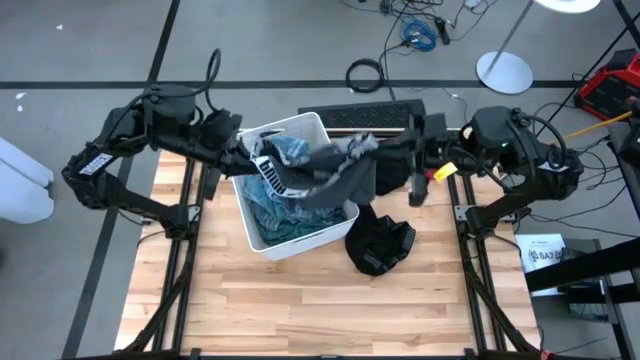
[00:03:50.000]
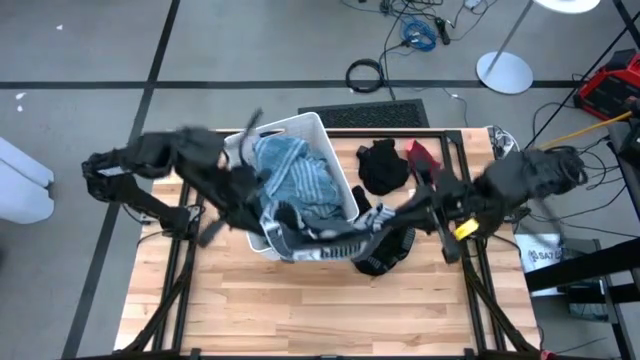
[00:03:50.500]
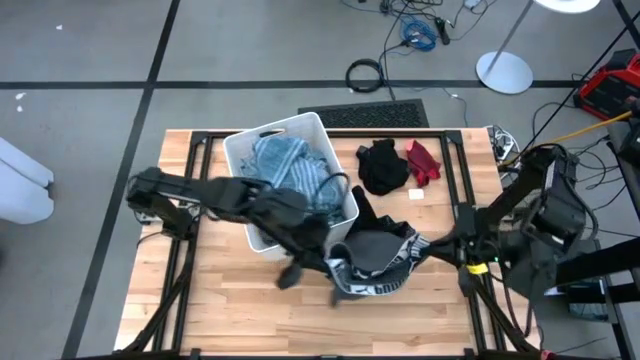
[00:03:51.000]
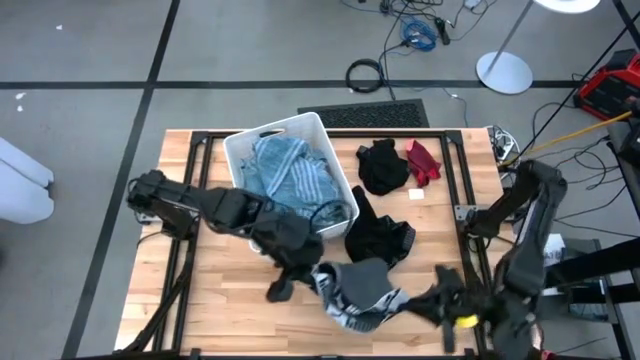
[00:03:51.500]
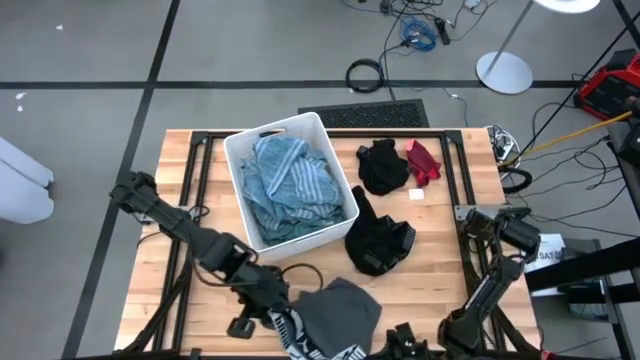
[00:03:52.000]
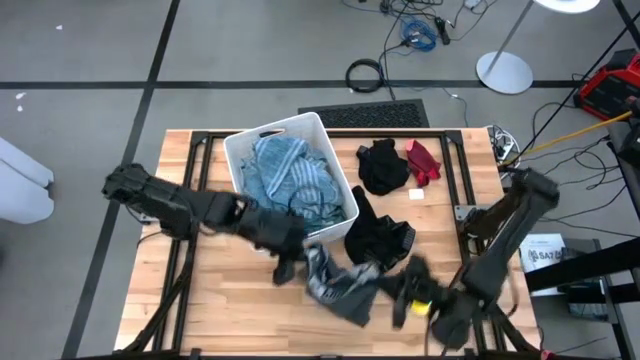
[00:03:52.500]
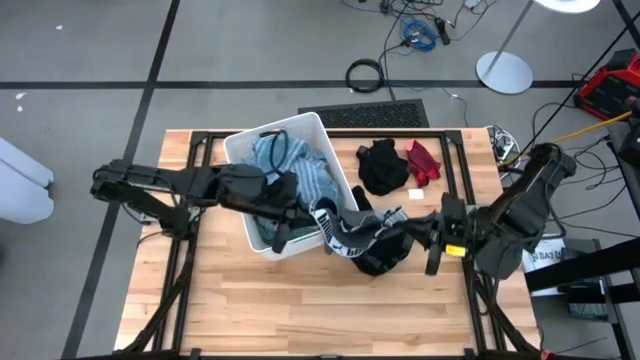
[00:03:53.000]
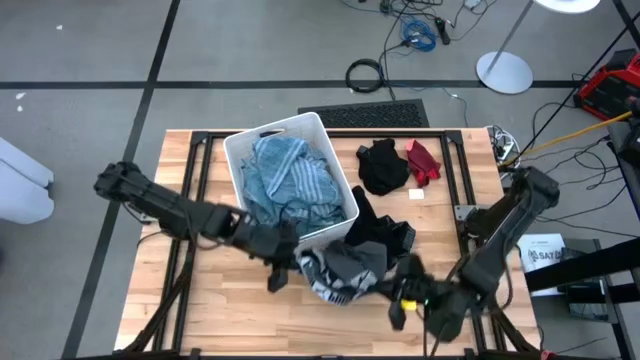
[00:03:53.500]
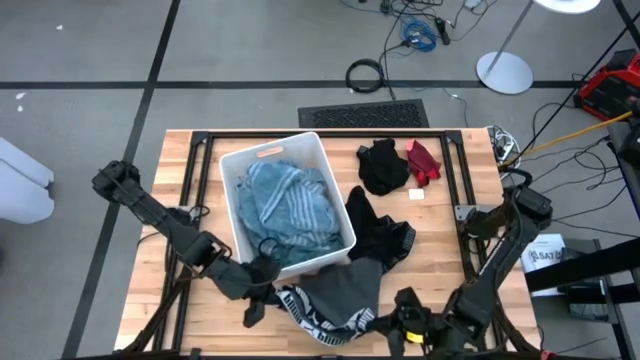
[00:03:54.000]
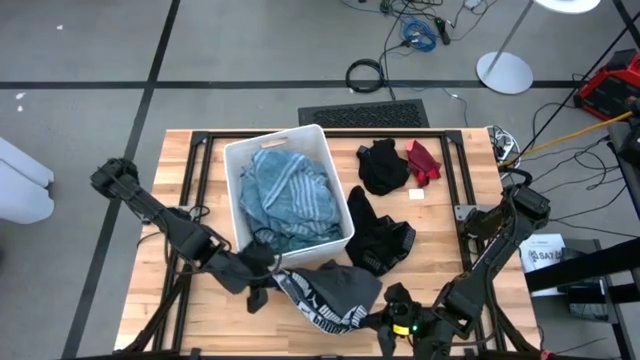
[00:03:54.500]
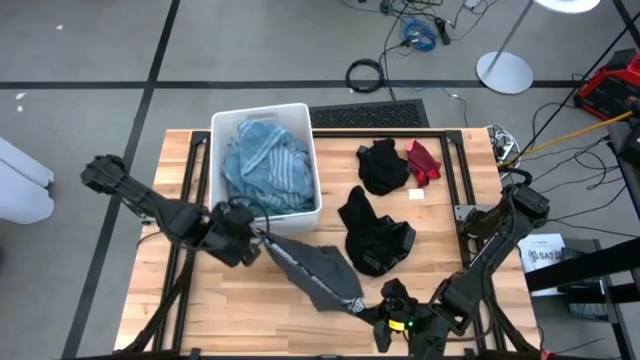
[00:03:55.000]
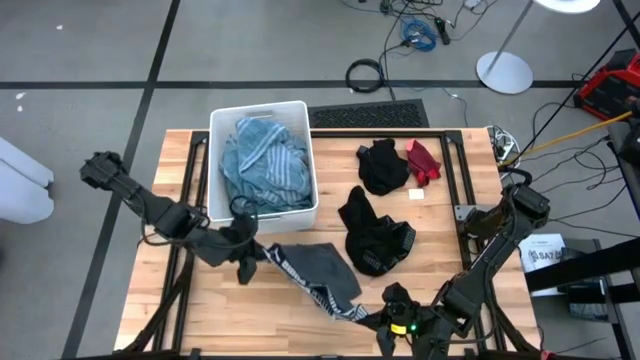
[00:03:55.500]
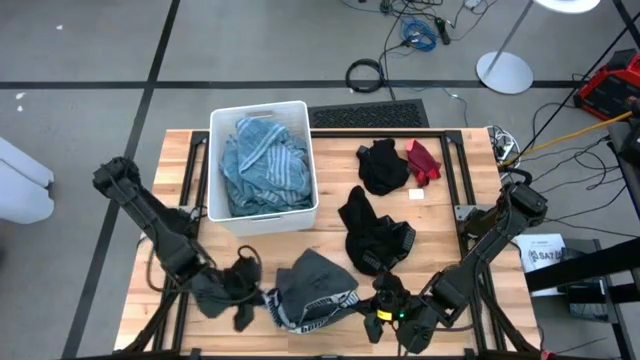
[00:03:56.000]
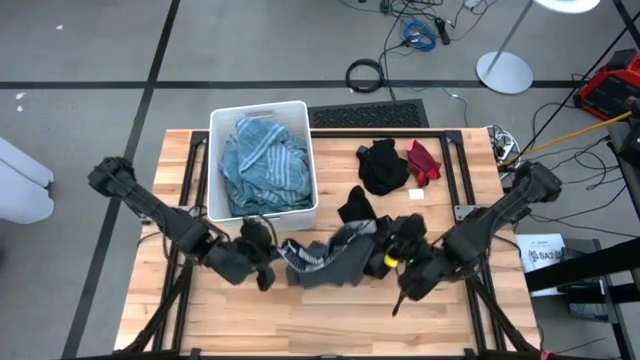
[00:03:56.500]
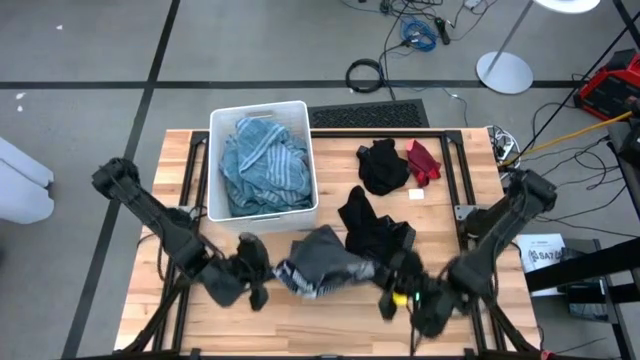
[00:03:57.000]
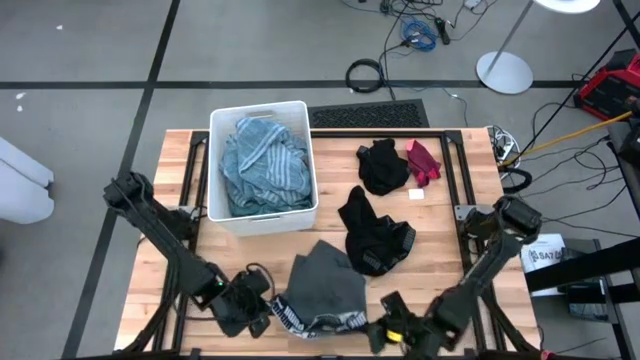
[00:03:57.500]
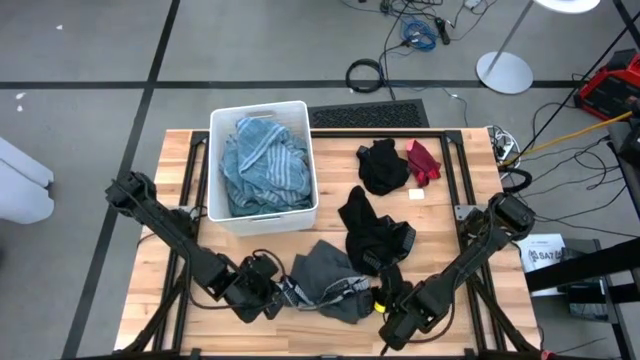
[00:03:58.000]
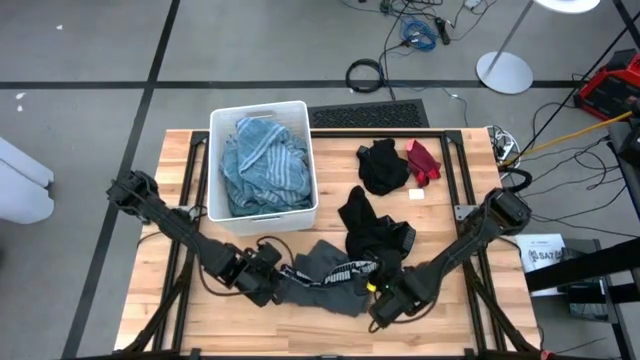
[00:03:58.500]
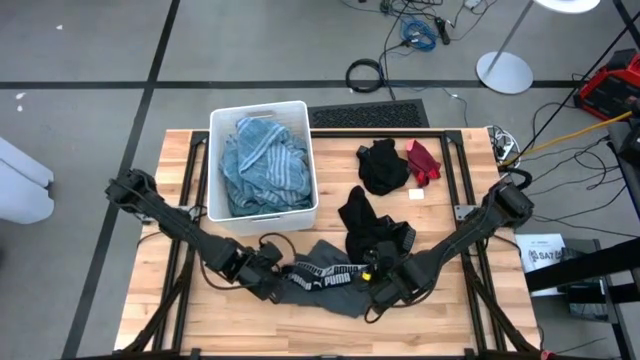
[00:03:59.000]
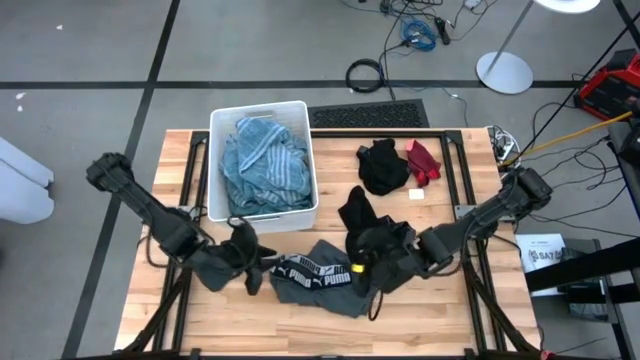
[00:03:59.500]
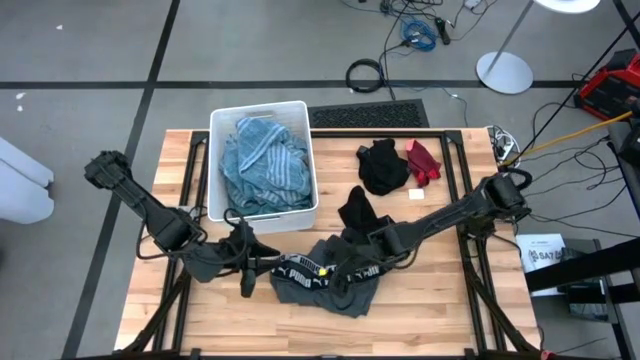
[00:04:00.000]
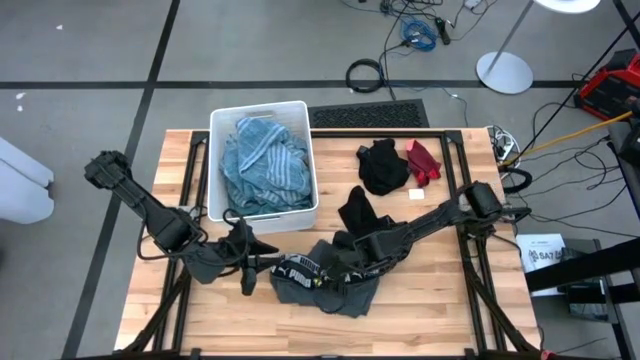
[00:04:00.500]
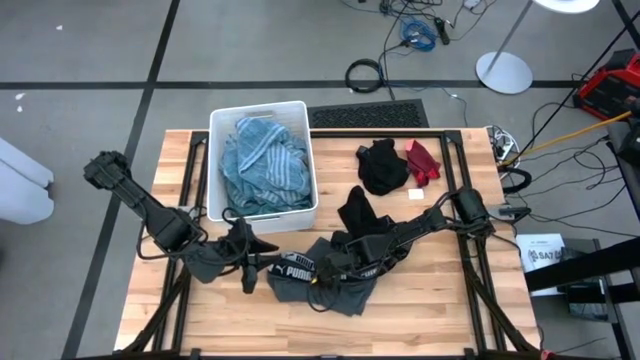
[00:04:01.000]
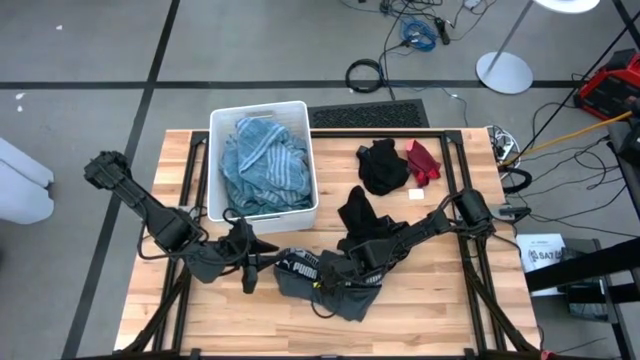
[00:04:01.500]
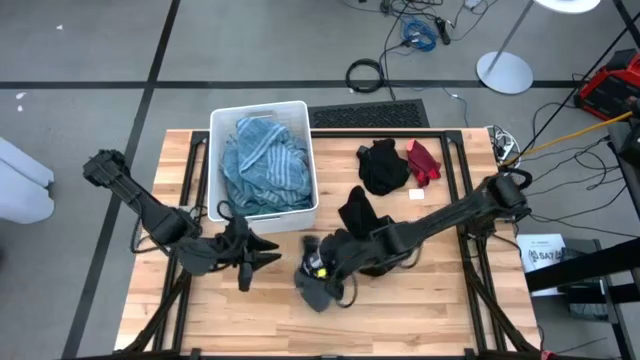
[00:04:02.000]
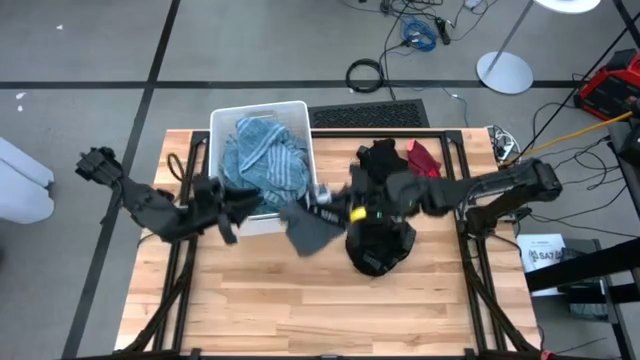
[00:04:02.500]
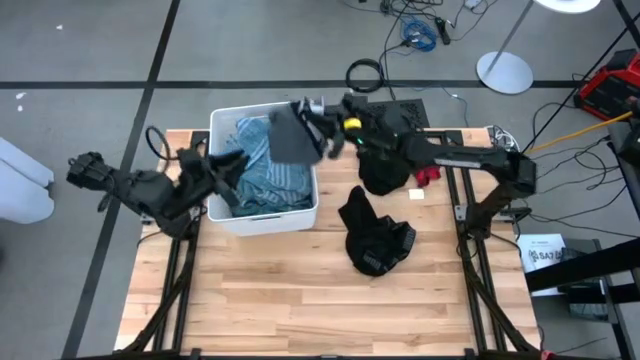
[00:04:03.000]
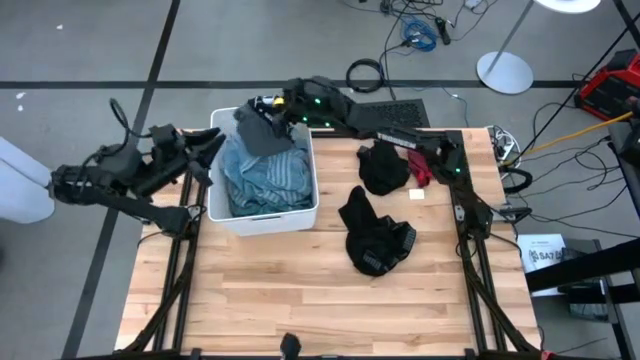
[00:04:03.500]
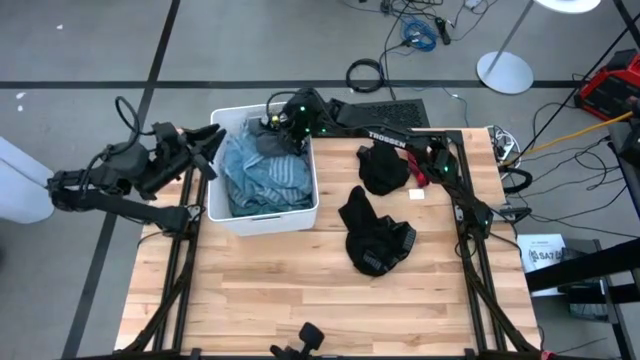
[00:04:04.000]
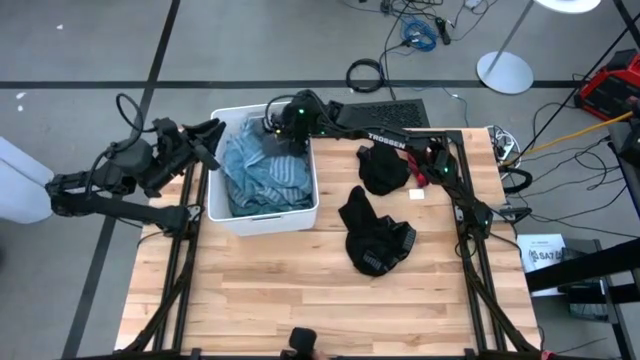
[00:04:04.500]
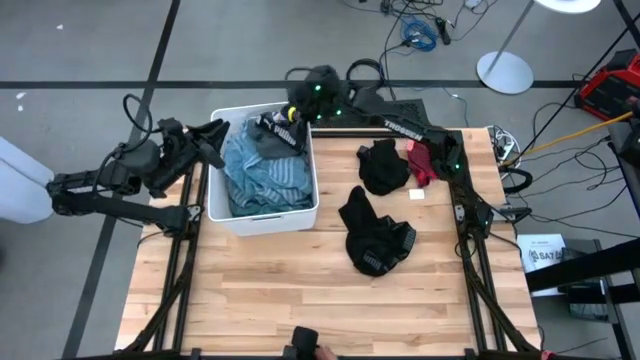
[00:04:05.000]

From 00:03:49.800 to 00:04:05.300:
Task: Sort clothes
Put the gray short into the white laundry bin

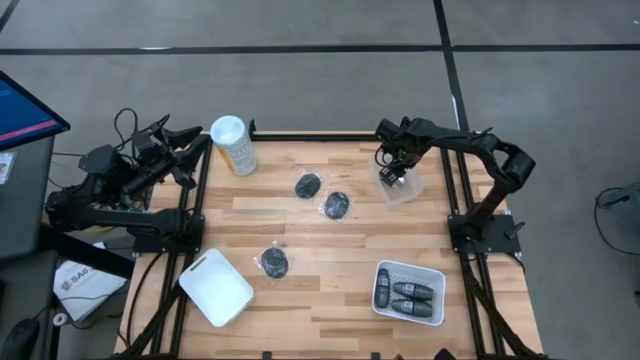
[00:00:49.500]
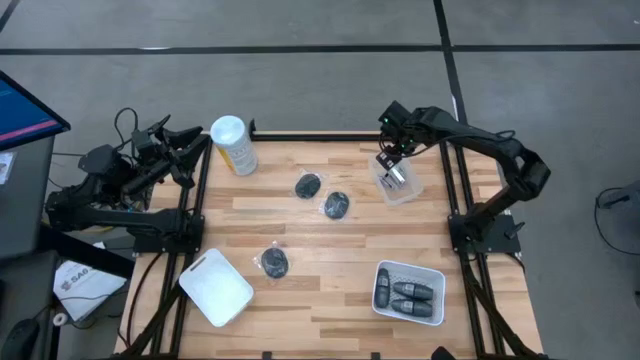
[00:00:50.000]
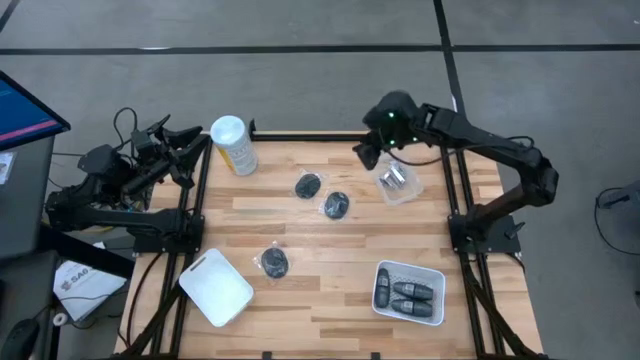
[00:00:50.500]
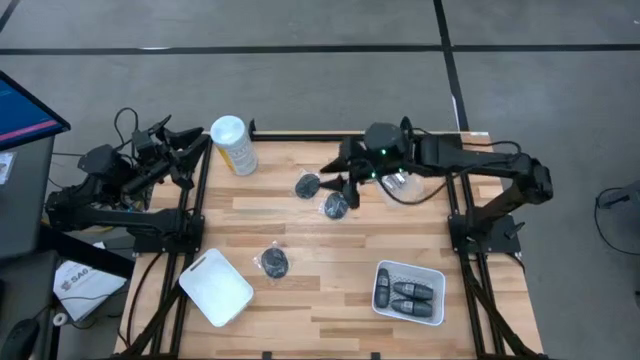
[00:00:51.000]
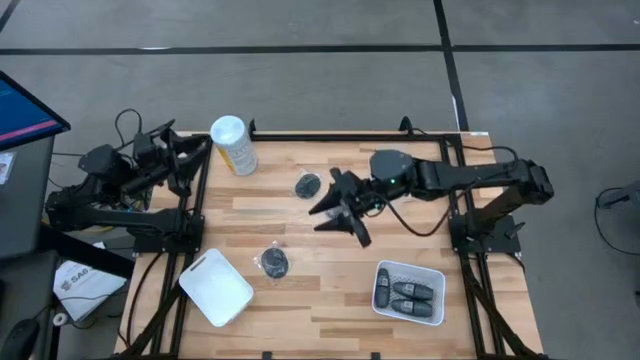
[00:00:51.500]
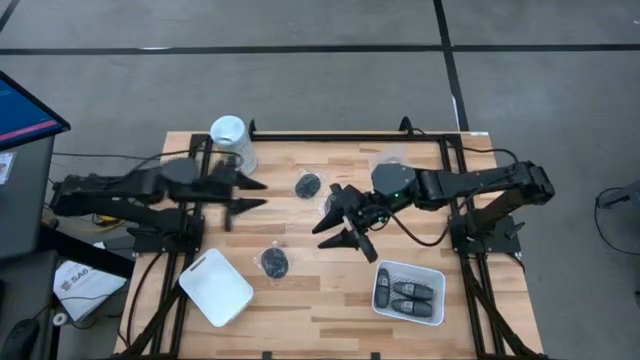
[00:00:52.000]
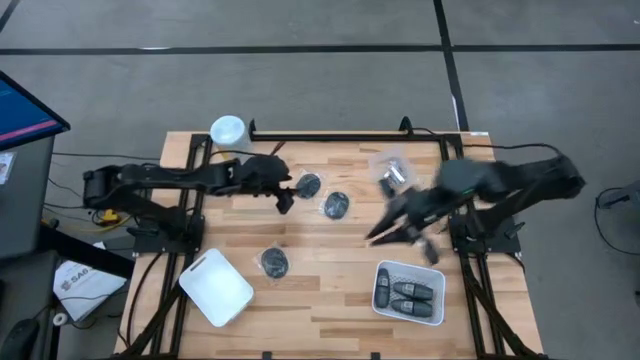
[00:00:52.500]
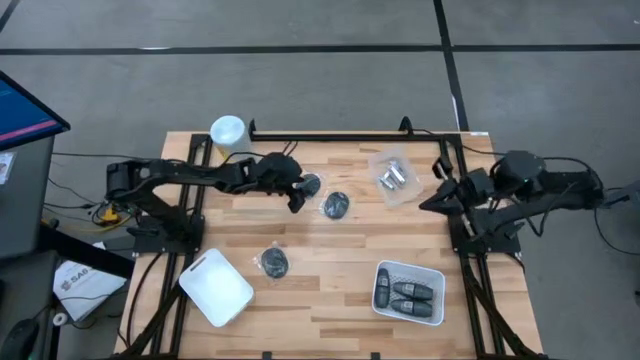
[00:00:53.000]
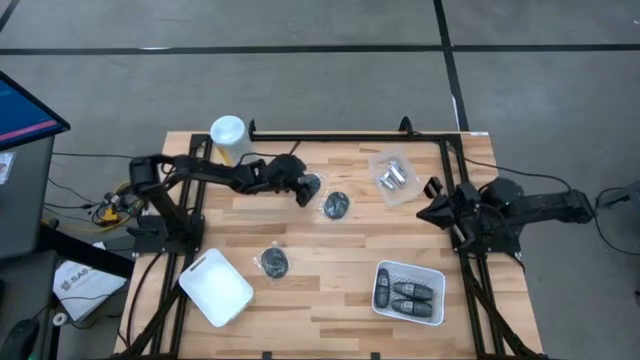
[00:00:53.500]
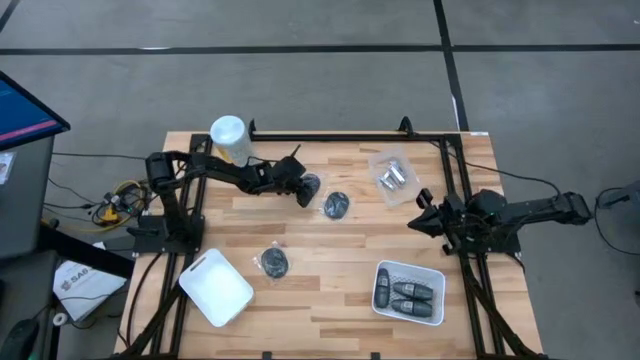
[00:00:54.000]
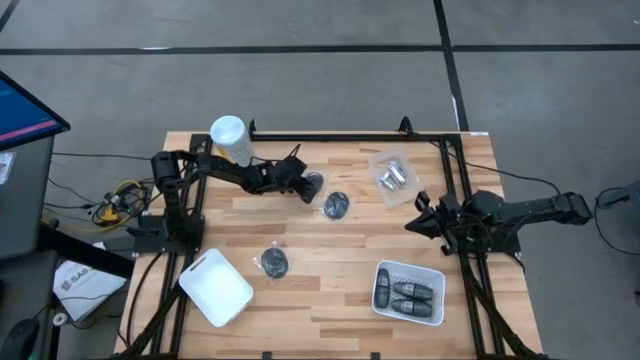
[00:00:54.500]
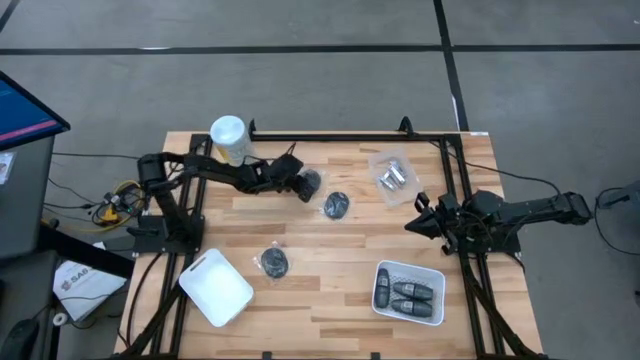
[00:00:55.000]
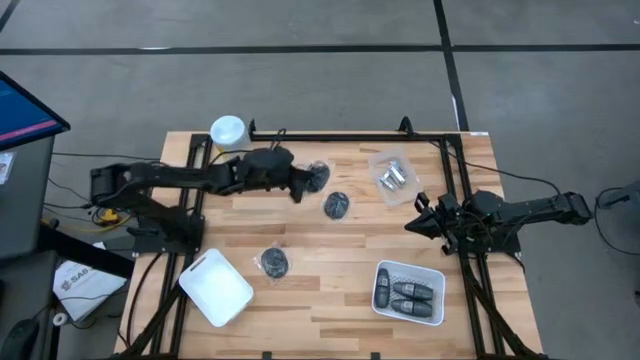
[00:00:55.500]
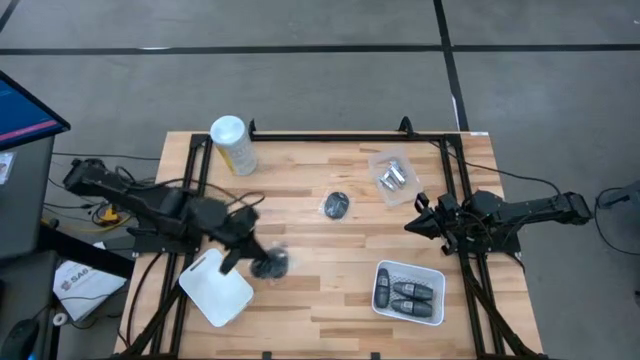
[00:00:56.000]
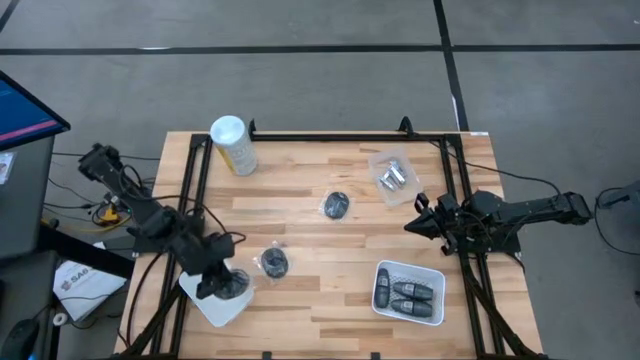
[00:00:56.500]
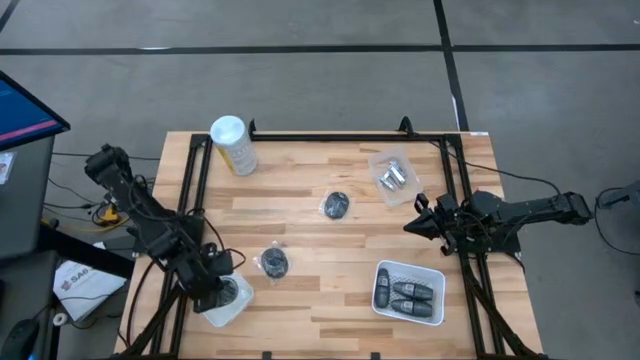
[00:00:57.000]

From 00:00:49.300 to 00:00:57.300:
Task: Pick & Place Travel size toiletries
Put the black hairbrush into the left white bin
